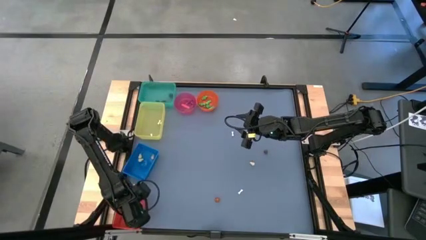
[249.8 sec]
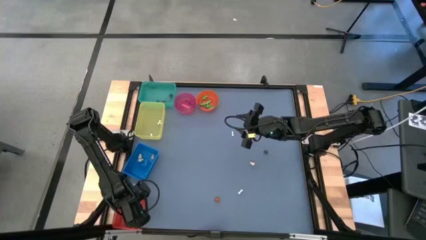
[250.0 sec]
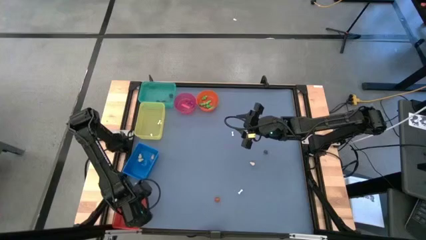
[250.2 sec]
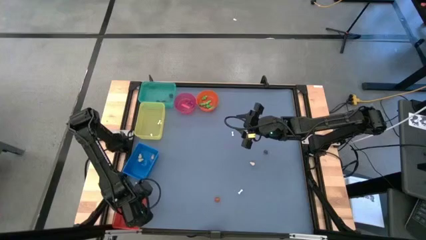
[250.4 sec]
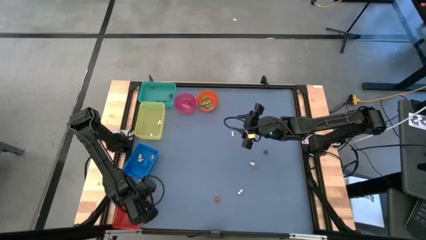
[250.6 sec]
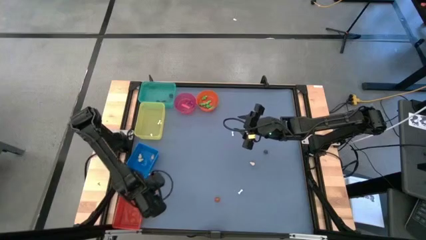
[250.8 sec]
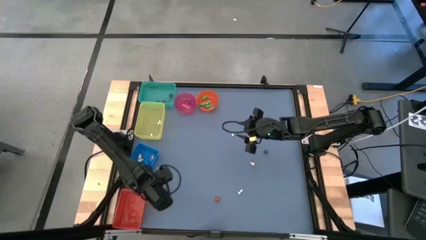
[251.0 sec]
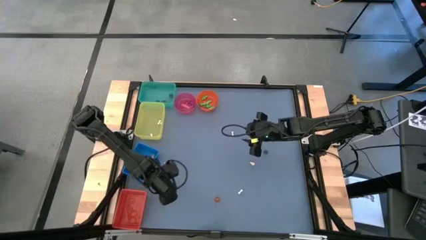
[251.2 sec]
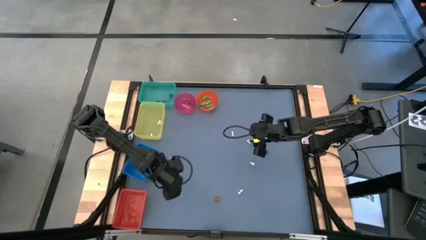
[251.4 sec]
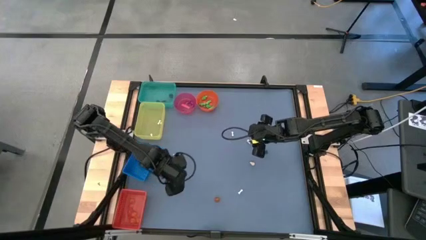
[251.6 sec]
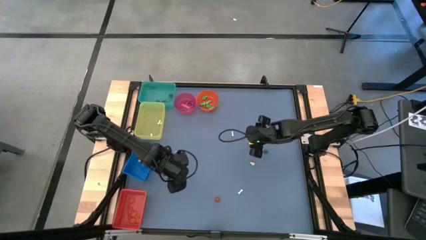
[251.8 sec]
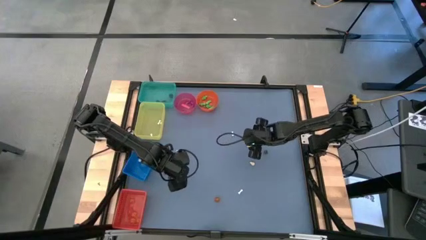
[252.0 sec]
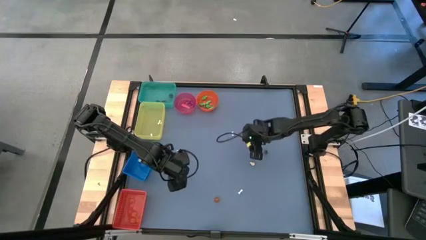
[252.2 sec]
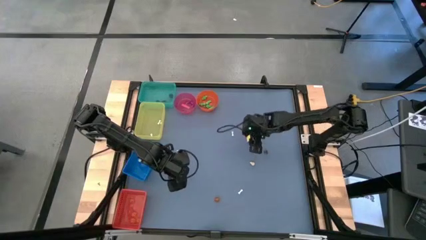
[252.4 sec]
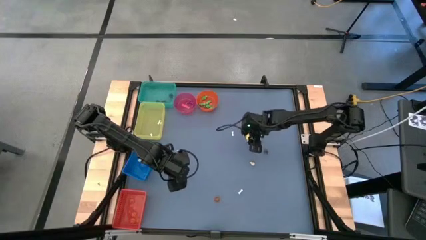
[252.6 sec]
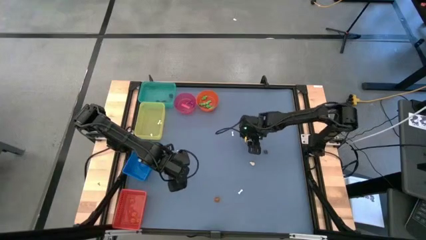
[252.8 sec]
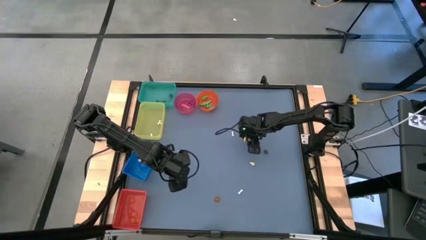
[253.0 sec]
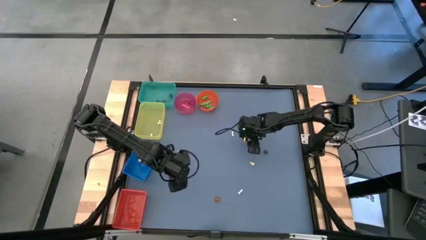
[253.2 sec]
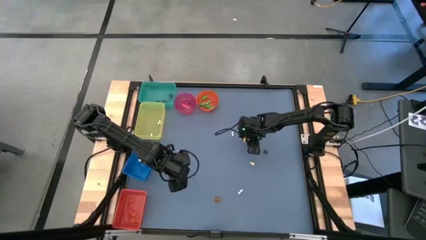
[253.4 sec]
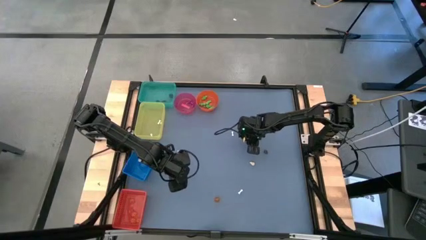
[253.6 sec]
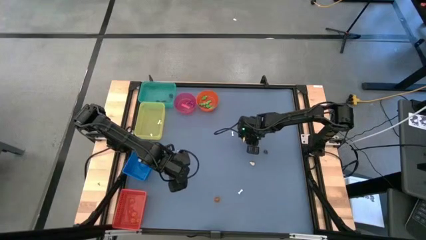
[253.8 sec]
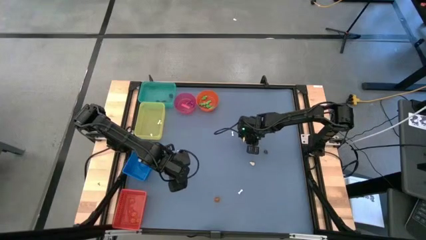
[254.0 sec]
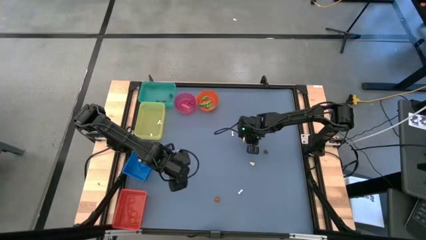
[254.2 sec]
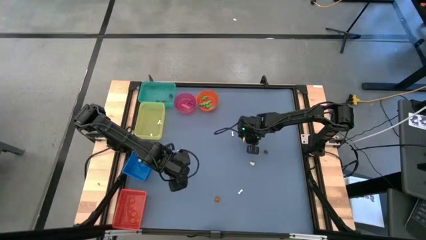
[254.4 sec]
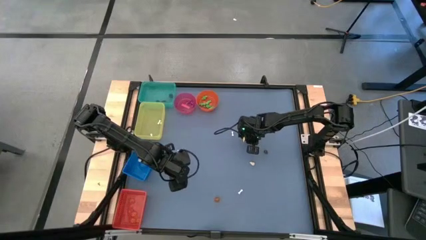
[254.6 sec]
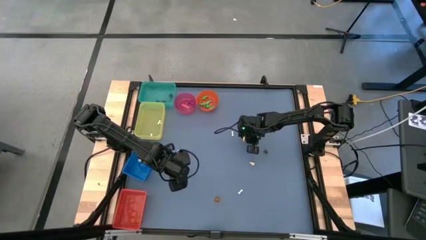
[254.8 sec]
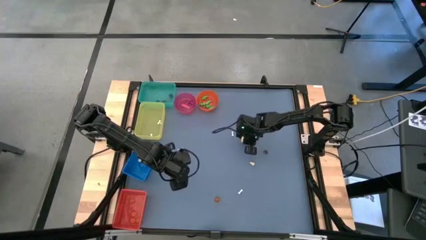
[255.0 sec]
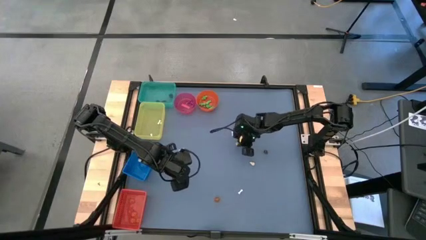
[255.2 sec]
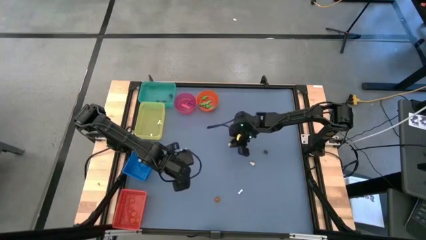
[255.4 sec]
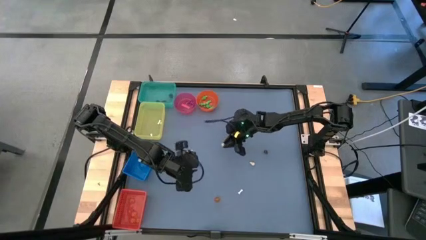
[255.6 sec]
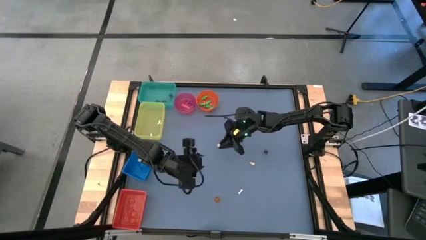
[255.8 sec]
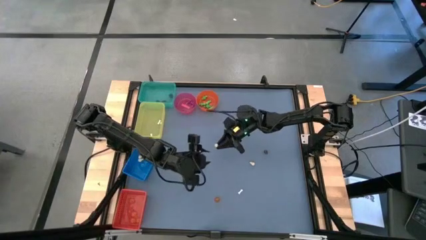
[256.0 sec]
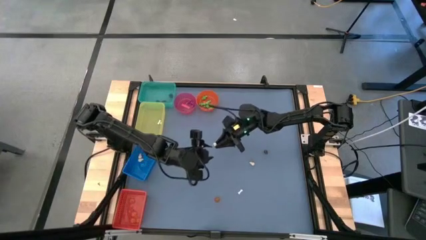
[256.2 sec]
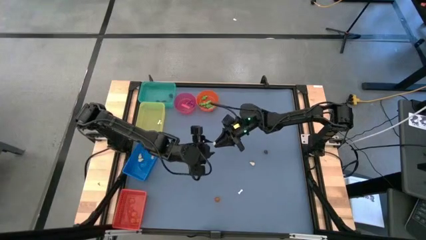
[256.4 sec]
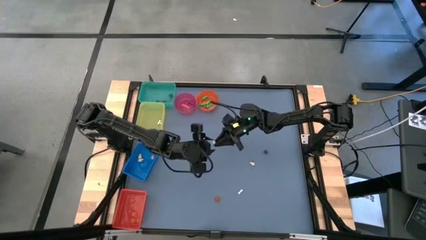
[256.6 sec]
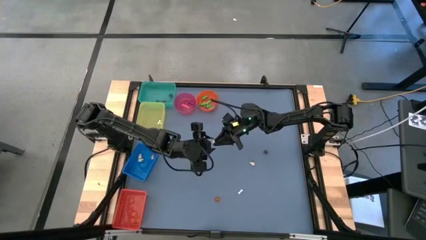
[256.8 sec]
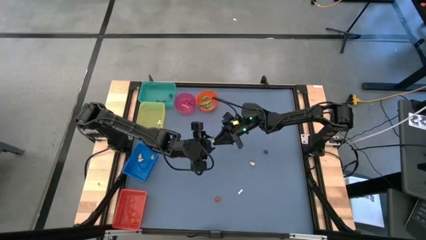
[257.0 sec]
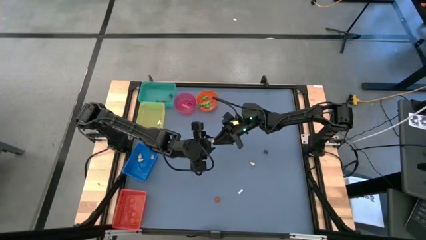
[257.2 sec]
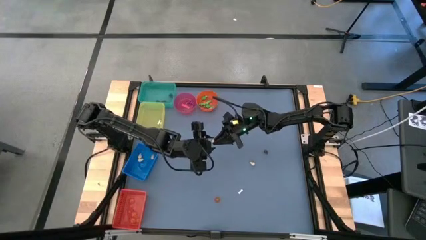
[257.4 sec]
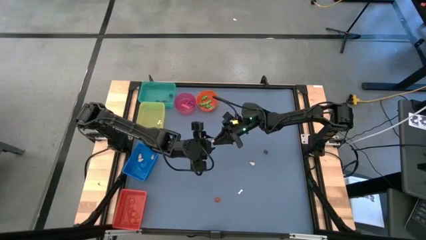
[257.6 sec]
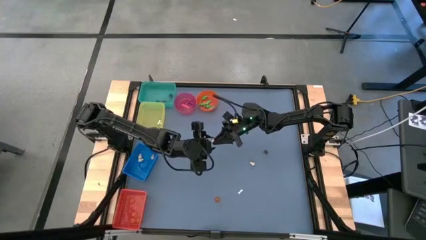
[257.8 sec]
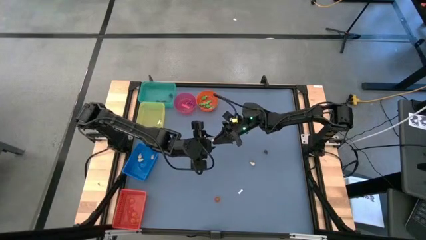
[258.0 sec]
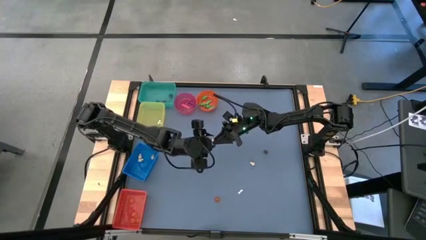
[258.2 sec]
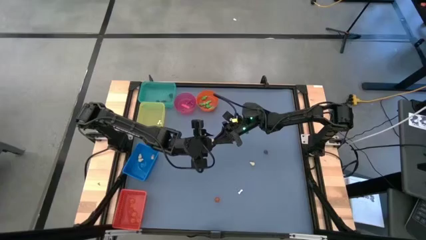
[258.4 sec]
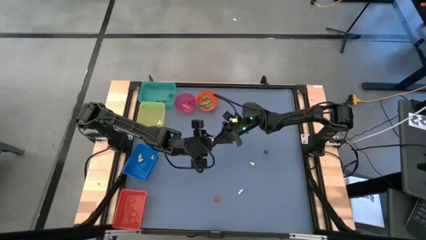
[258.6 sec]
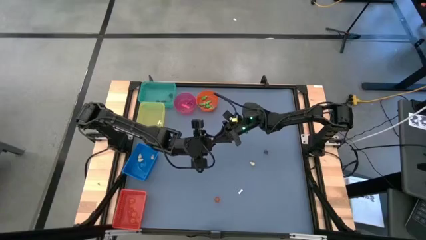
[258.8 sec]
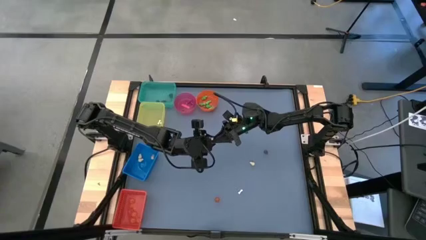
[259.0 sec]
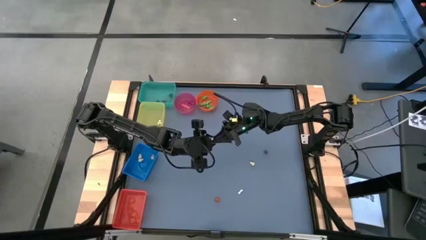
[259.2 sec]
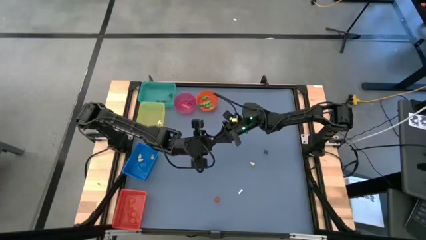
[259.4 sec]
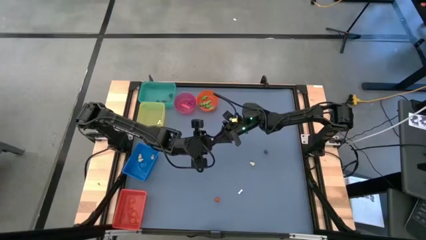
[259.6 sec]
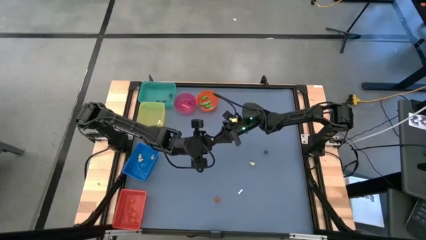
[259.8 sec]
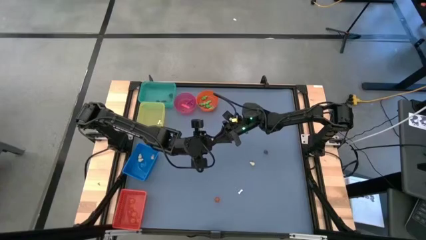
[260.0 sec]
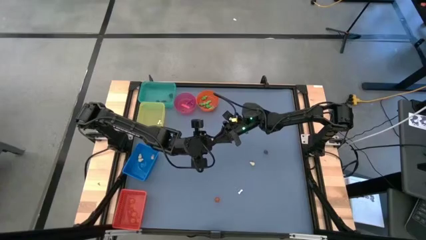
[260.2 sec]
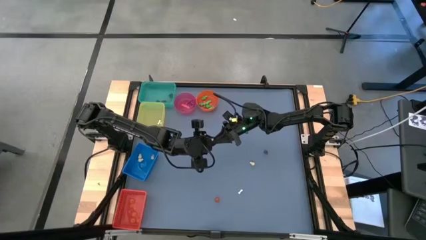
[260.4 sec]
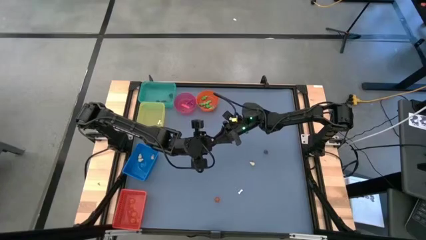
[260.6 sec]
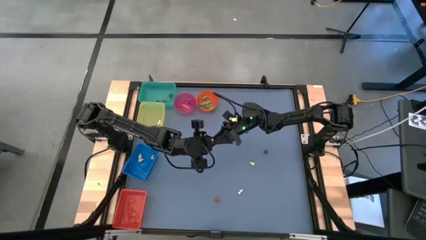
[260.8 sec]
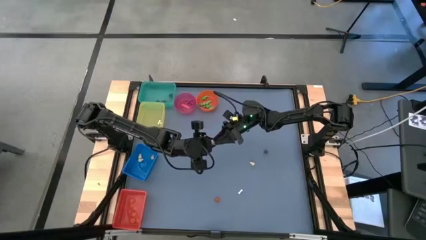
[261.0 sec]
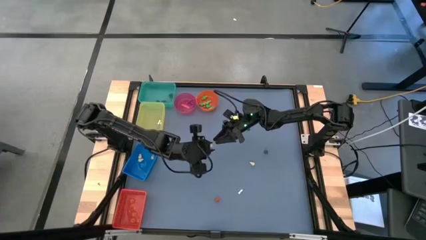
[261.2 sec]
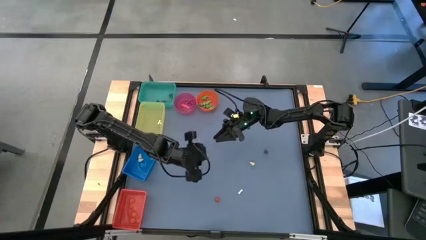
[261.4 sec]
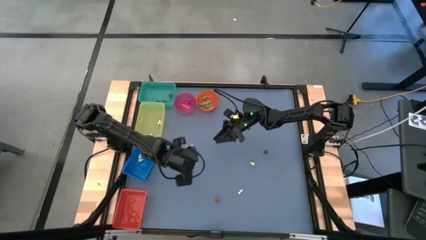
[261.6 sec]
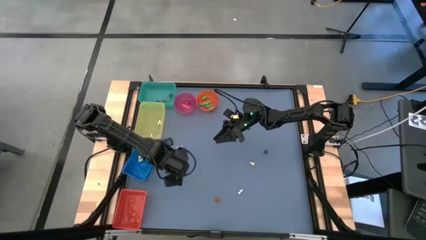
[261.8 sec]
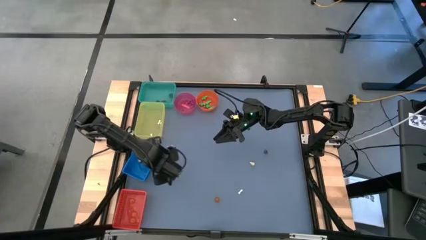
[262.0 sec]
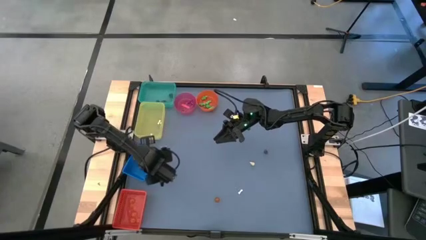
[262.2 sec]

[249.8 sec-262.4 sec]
Task: Sort Halloween decoration
Put the yellow skull toy into the blue bin
